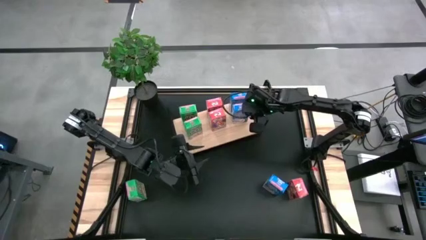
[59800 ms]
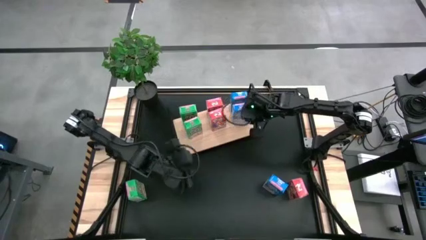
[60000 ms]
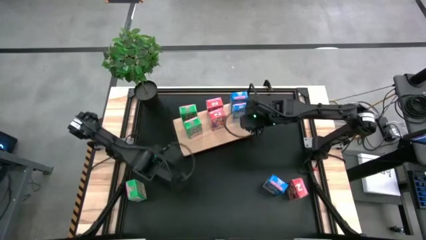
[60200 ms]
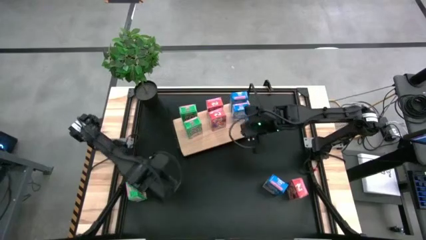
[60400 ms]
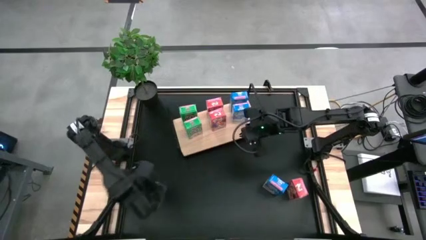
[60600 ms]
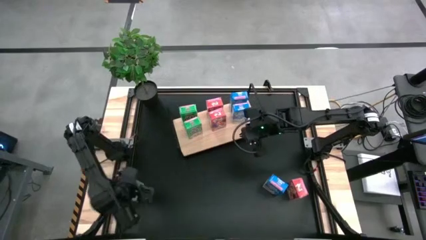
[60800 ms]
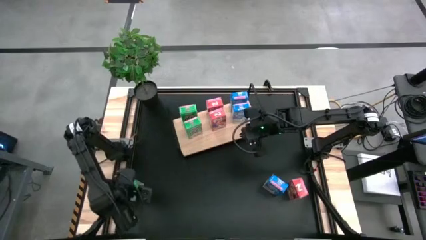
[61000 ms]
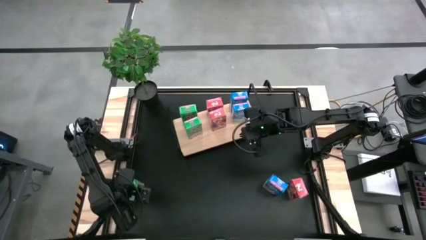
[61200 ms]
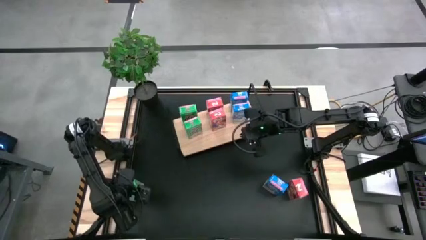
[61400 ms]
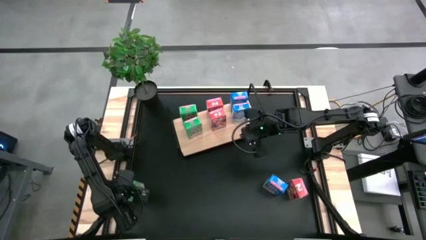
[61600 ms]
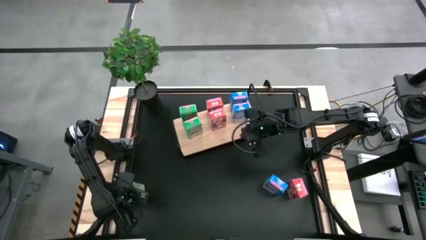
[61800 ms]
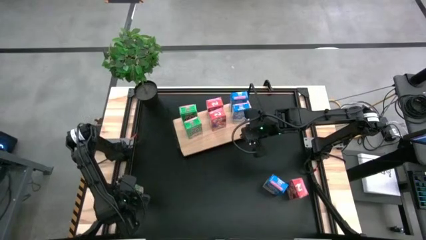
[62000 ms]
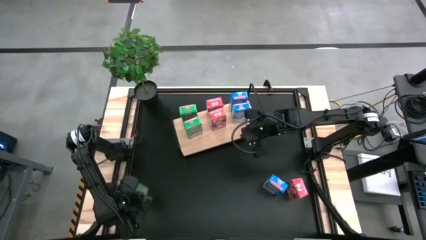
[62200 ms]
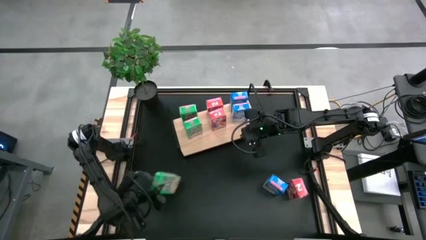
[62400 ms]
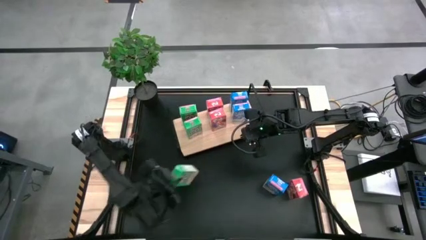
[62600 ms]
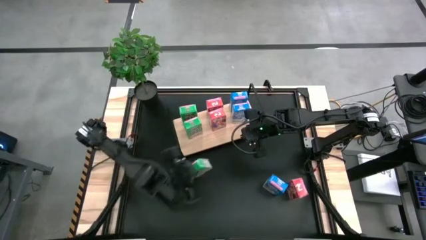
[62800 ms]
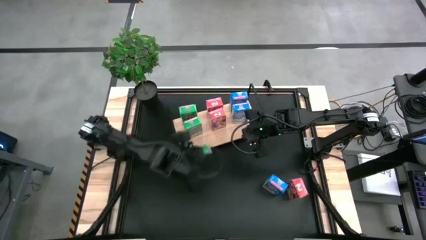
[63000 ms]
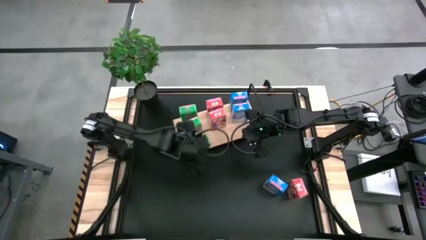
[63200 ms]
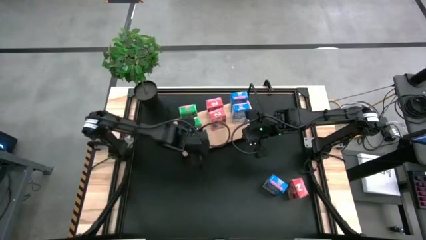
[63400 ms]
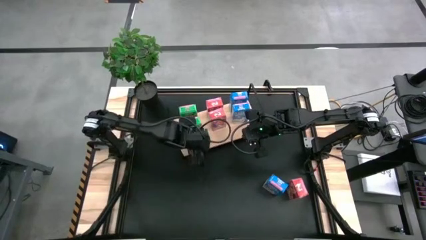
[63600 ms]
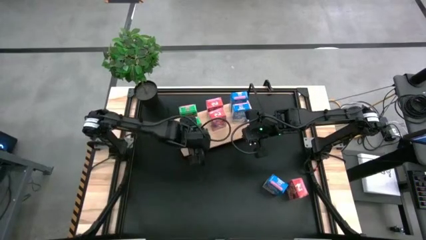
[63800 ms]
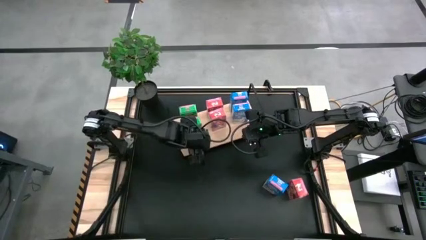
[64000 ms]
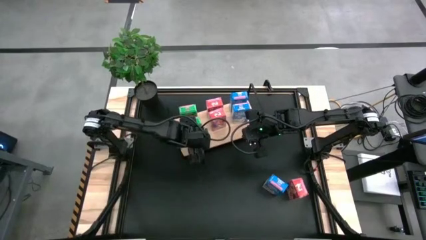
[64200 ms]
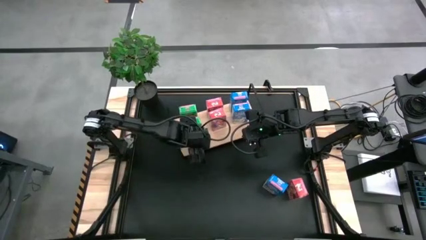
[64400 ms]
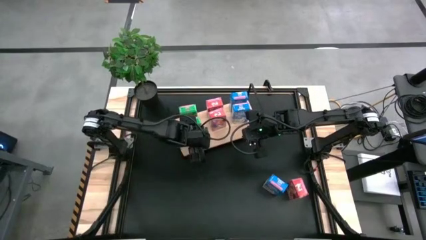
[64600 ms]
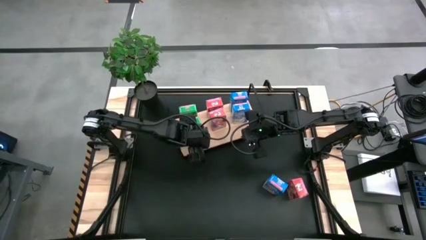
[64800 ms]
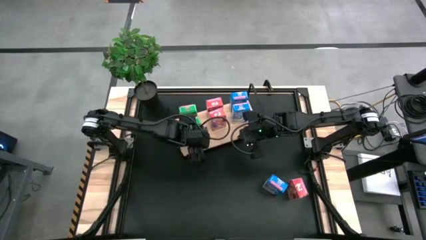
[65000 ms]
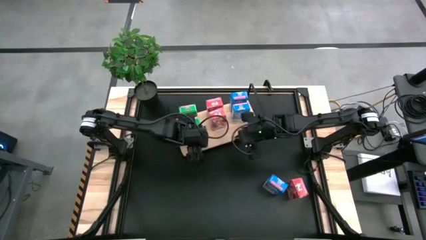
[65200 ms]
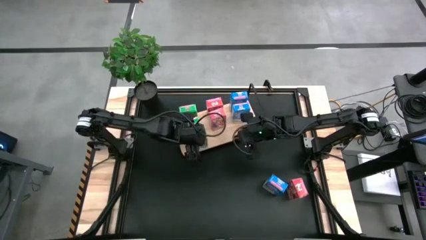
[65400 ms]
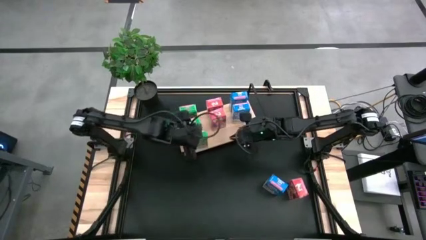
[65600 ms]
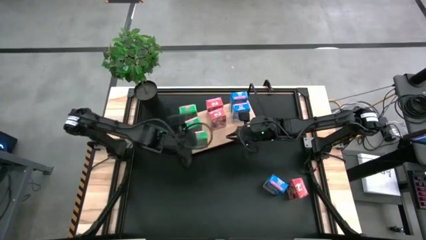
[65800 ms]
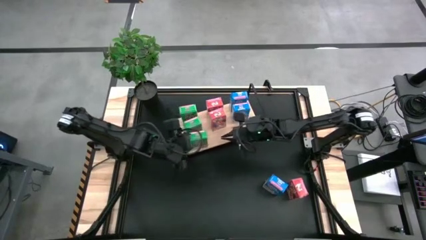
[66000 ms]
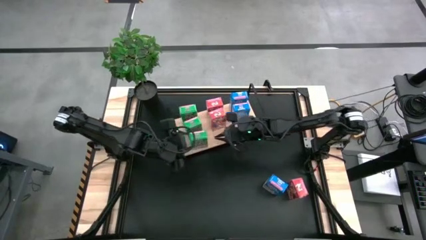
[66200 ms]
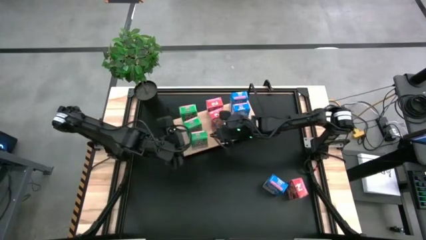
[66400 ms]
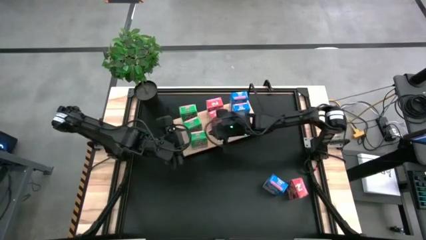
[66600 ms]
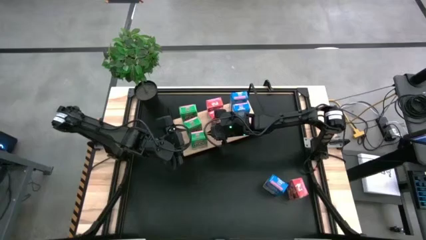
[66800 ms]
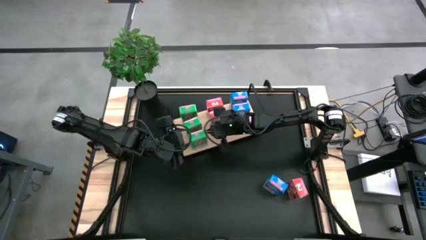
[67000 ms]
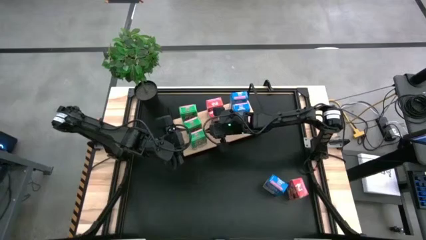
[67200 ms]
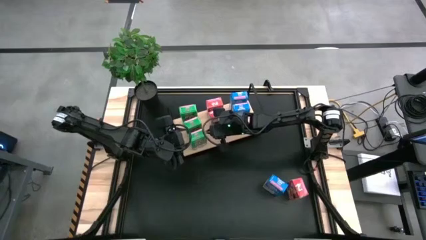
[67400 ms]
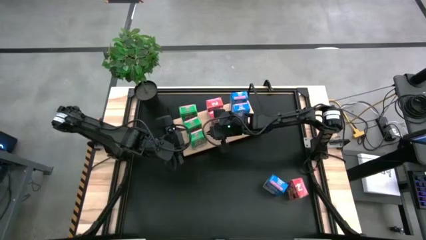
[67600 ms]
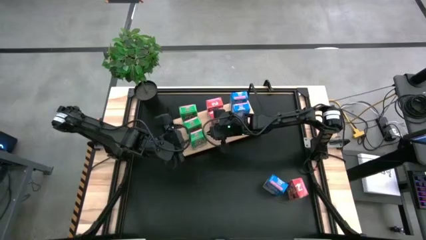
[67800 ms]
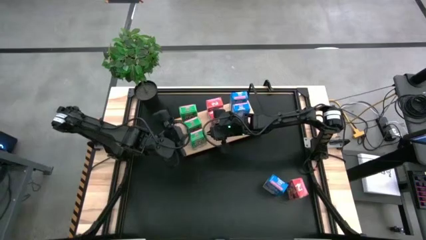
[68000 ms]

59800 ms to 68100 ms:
Task: Stack cereal on shelf
Align the green cereal box with the other green cereal box on the shelf

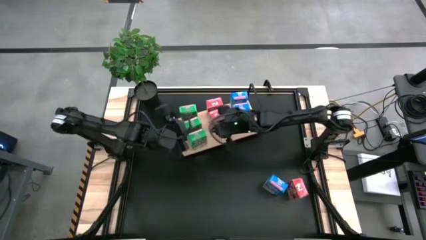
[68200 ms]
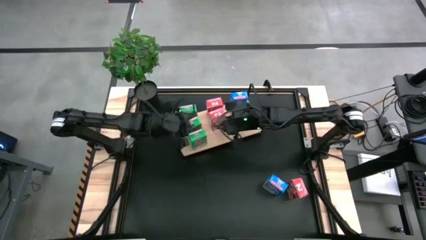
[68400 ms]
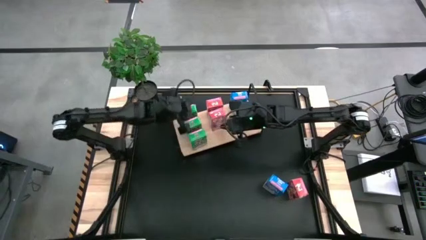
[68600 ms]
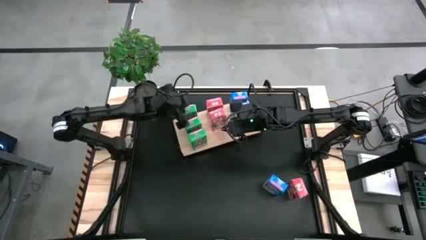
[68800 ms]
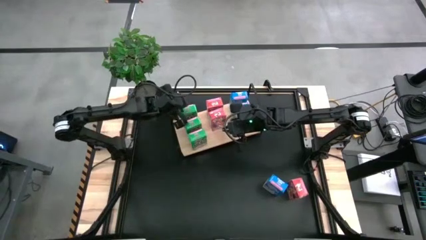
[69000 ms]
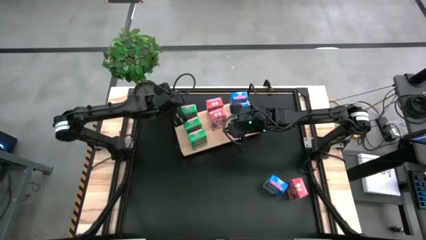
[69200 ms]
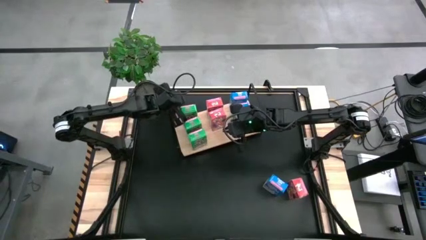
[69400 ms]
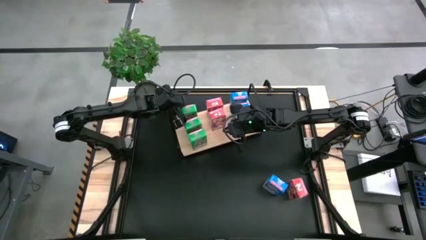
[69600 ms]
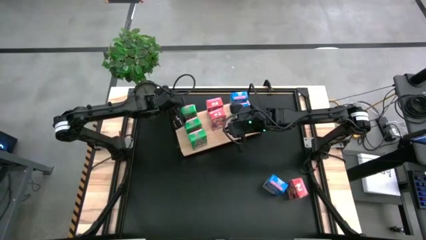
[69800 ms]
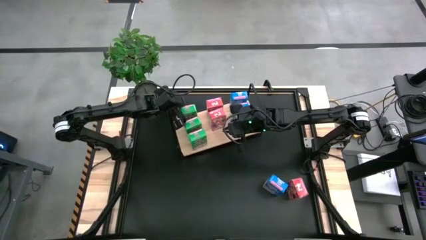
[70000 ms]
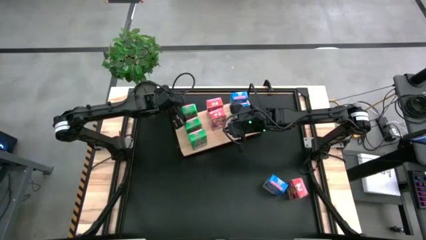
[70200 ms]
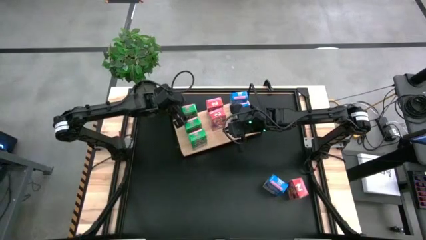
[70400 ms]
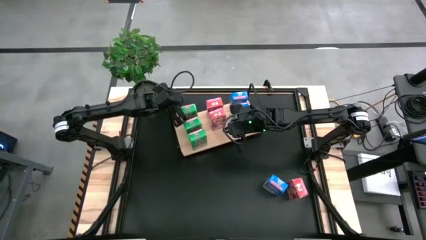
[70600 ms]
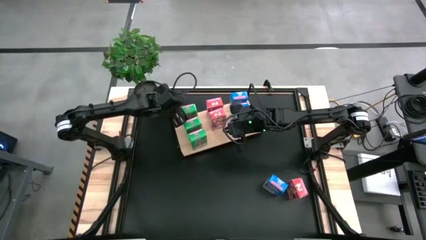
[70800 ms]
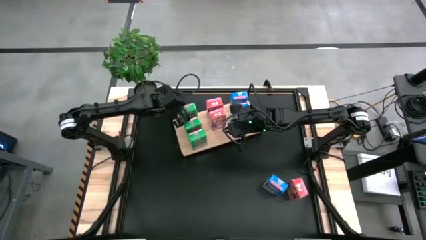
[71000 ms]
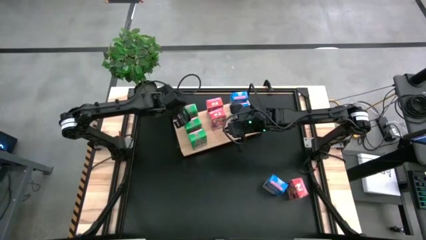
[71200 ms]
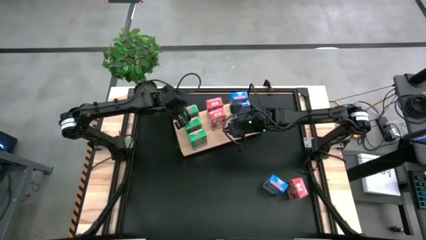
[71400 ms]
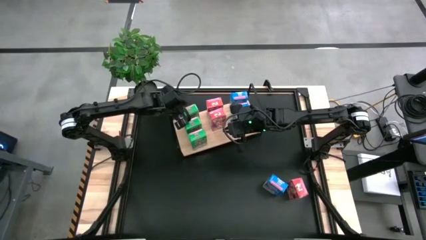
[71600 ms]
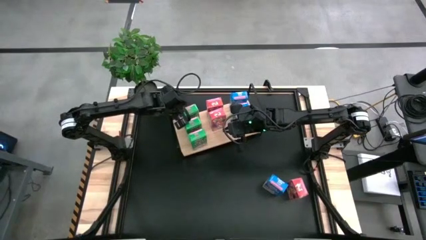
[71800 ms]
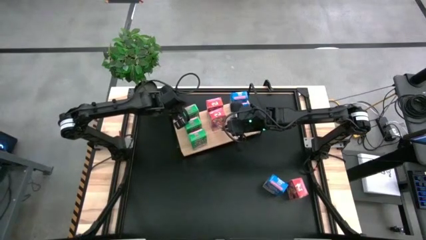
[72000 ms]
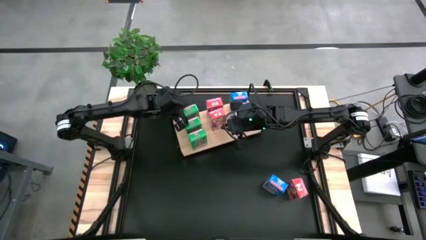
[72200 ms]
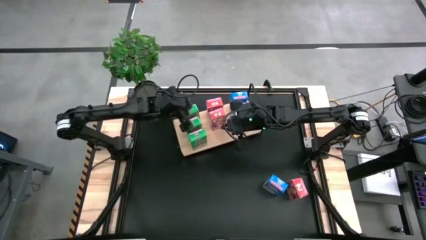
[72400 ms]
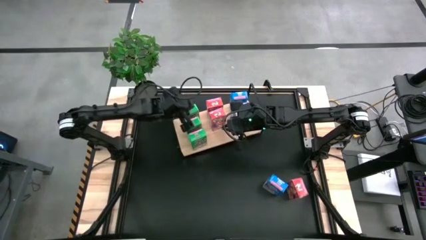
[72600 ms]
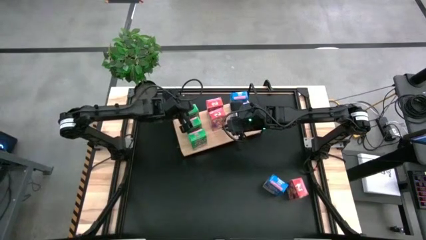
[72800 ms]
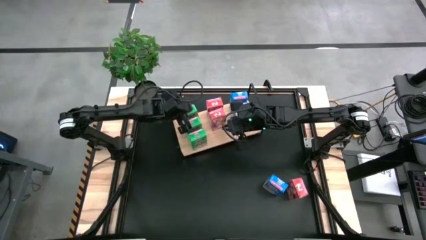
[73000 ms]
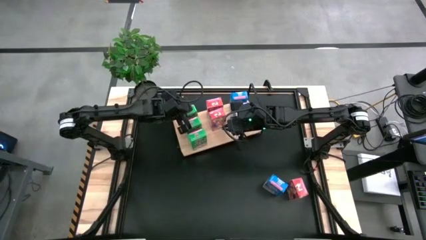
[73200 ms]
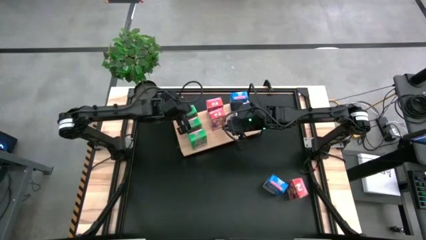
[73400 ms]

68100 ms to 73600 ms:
Adjust the green cereal box on the shelf

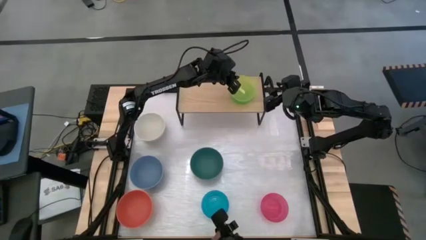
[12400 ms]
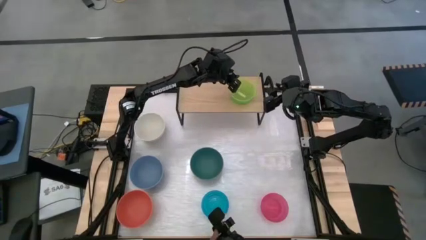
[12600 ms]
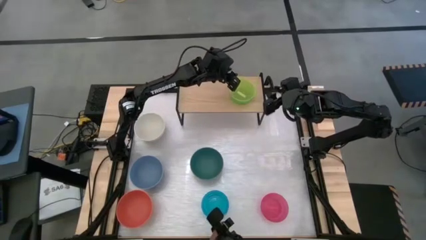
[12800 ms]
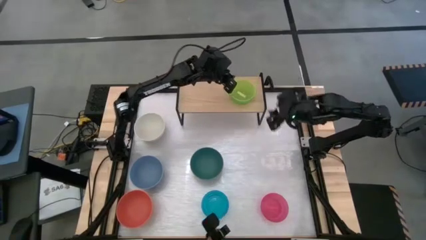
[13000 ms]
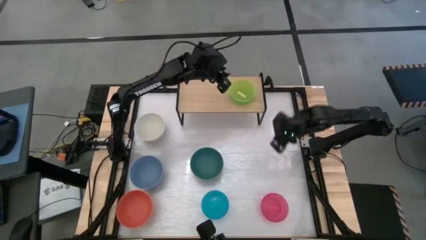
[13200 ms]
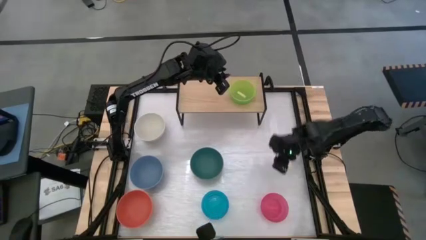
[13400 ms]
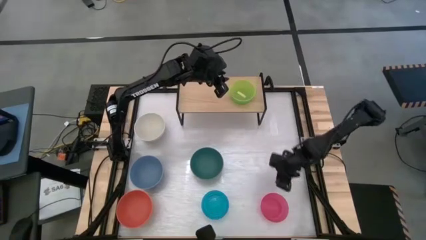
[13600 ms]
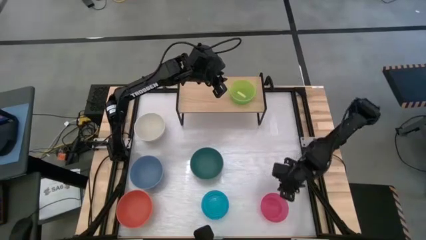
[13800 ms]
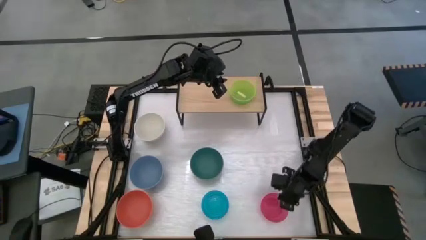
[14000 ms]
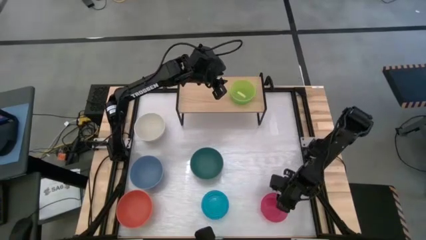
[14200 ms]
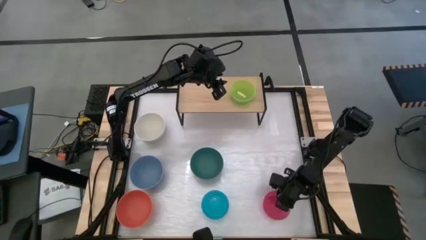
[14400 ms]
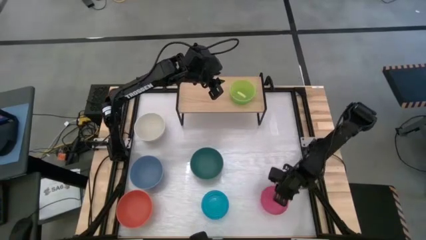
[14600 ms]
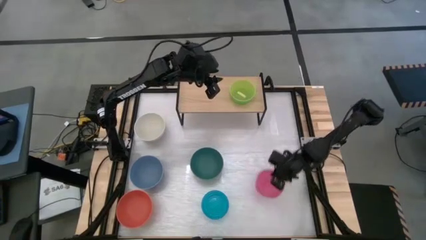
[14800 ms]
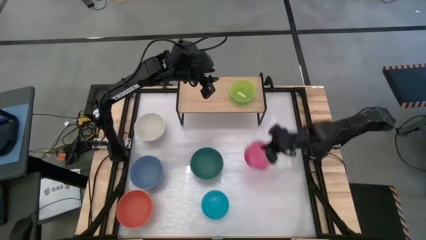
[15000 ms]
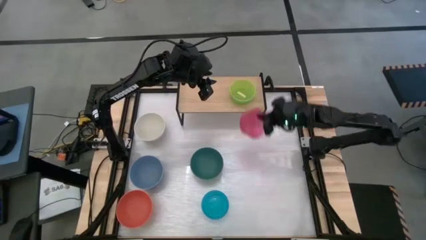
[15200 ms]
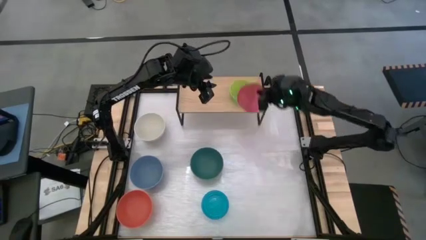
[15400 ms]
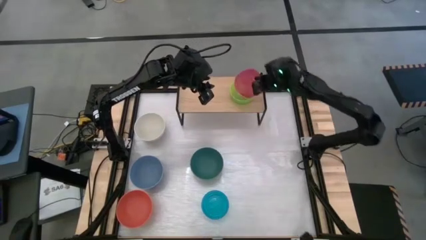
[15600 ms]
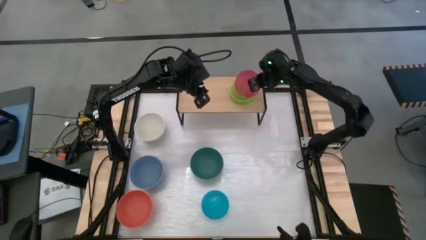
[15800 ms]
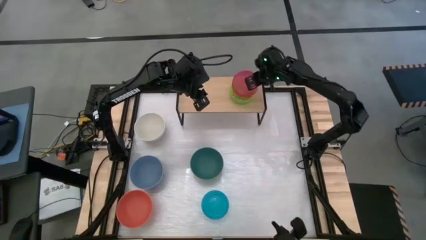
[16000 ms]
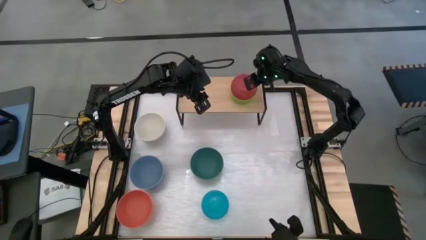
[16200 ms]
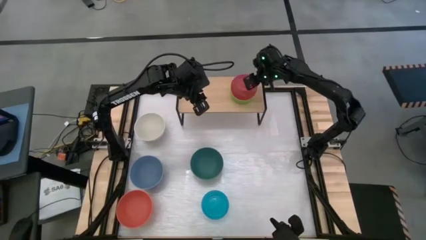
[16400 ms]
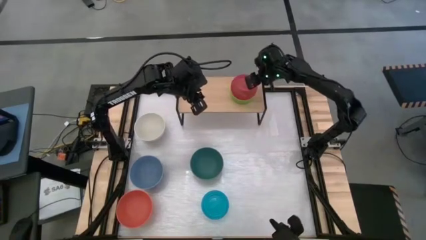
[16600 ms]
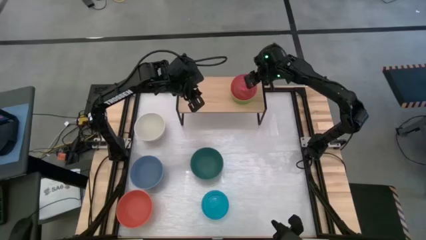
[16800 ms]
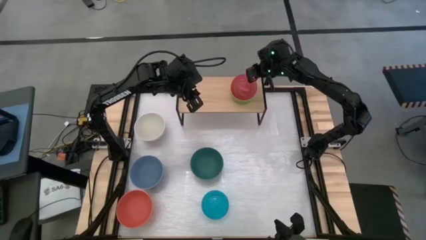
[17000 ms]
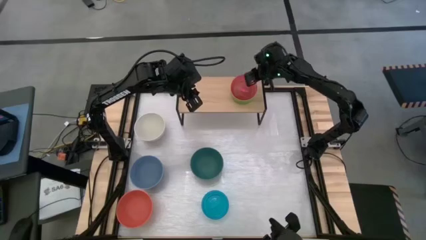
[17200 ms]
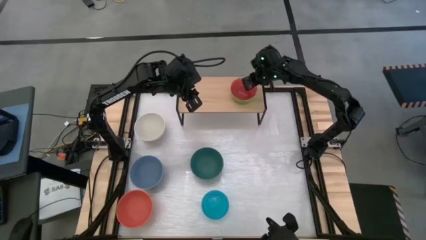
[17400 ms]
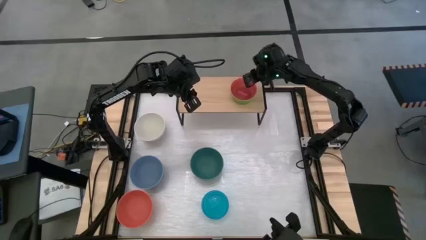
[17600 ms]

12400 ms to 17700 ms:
Task: Place and stack bowls onto a shelf
Stack the small red bowl on top of the yellow bowl on the shelf
